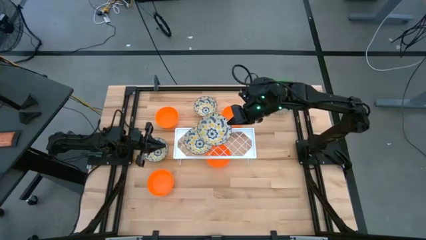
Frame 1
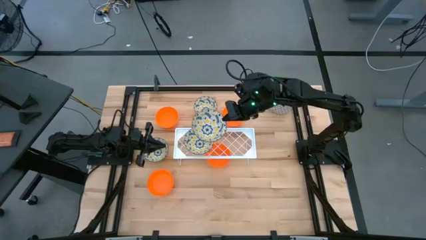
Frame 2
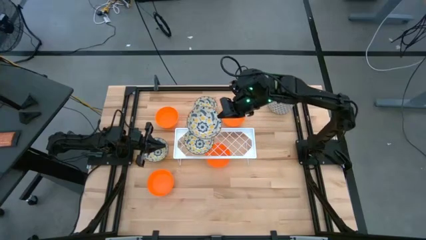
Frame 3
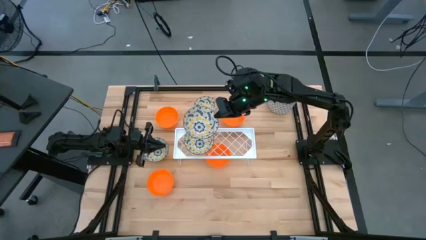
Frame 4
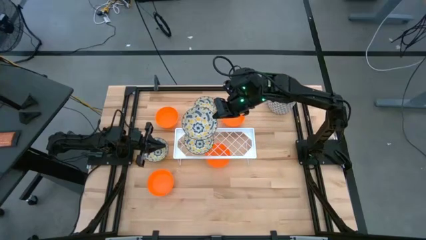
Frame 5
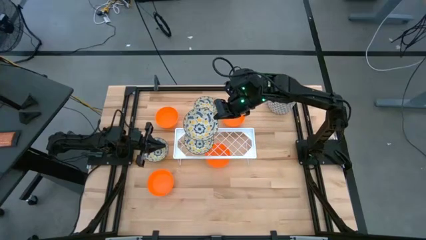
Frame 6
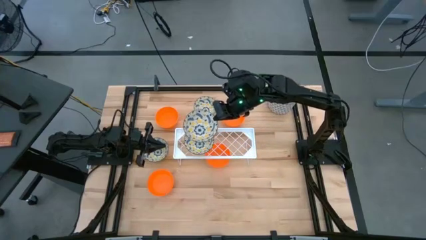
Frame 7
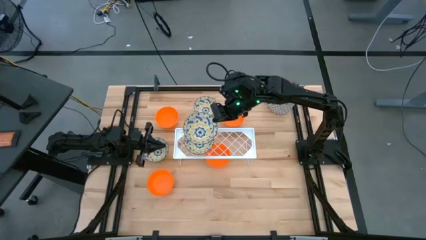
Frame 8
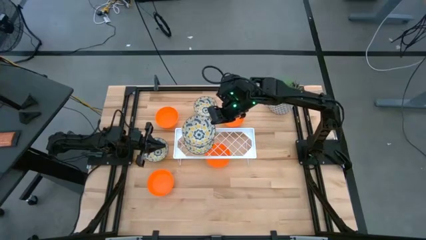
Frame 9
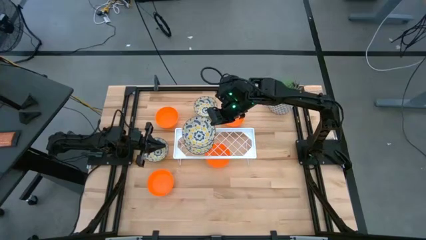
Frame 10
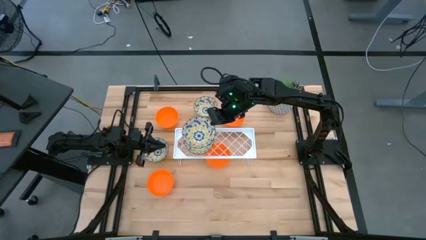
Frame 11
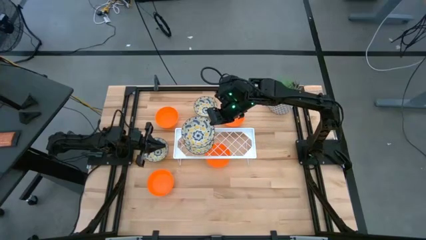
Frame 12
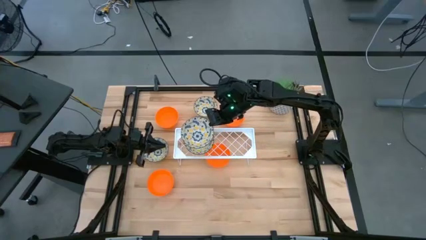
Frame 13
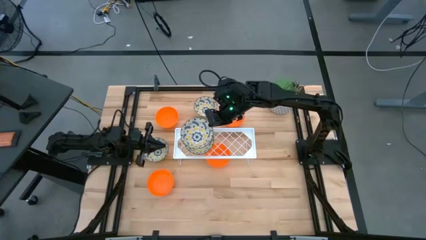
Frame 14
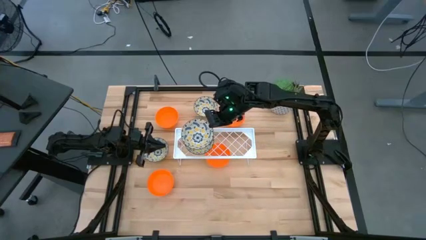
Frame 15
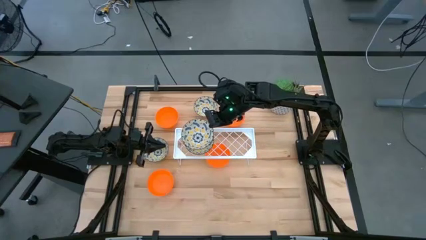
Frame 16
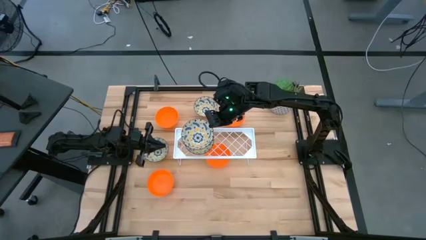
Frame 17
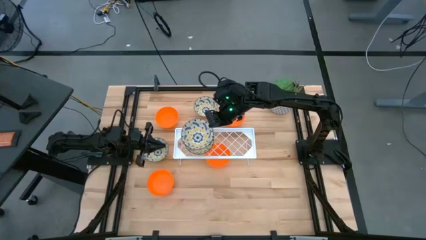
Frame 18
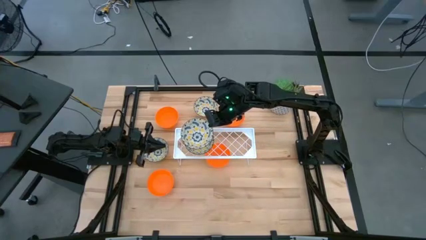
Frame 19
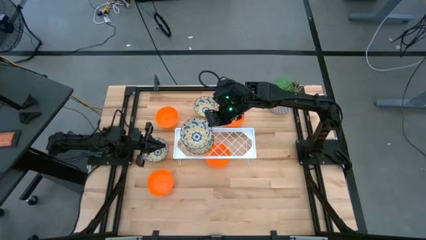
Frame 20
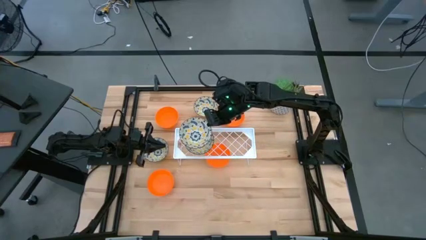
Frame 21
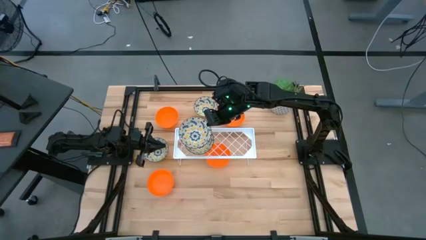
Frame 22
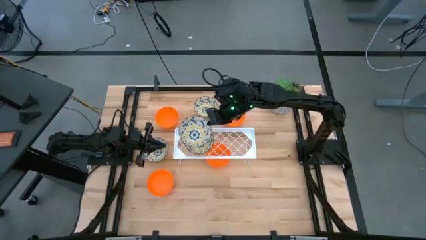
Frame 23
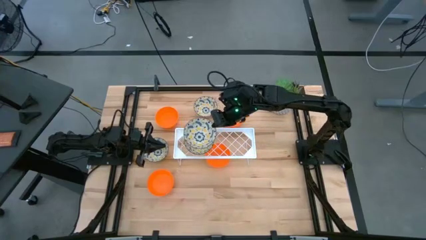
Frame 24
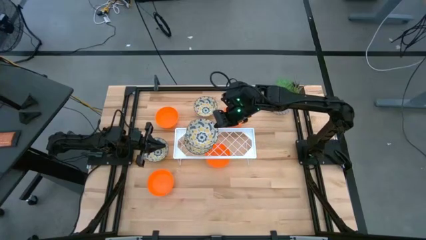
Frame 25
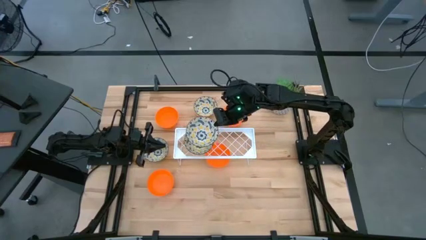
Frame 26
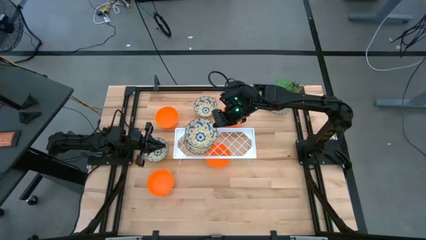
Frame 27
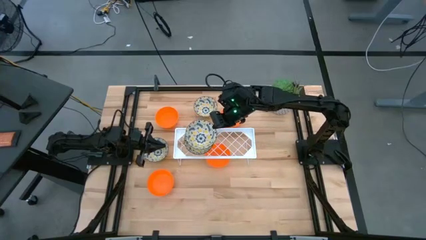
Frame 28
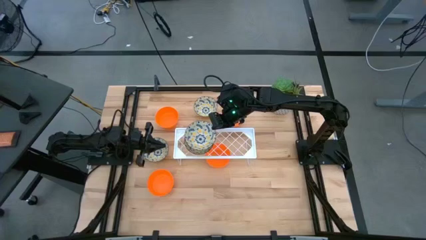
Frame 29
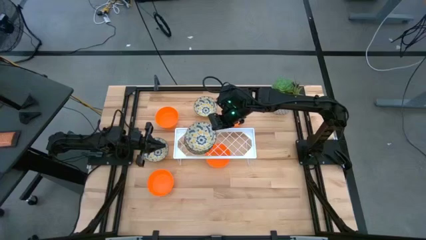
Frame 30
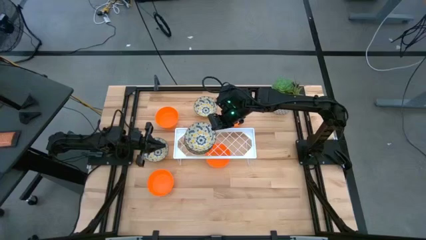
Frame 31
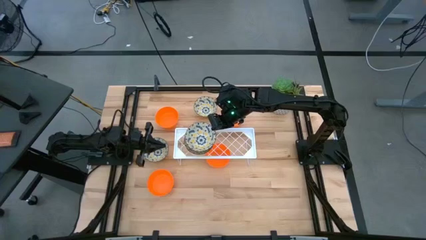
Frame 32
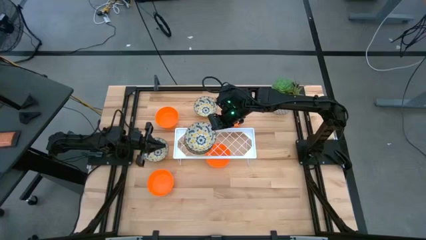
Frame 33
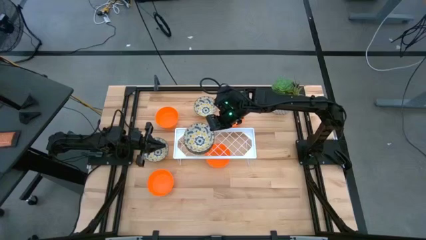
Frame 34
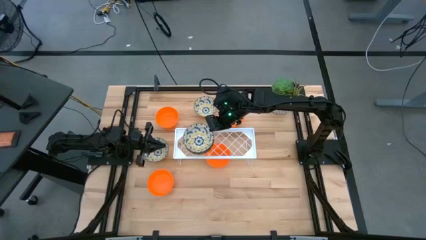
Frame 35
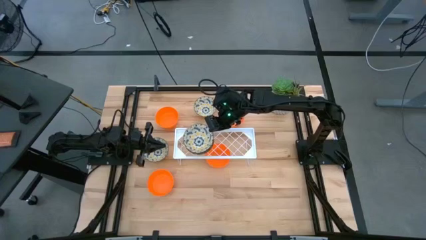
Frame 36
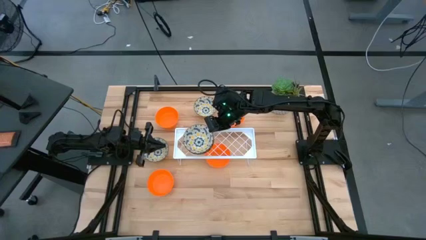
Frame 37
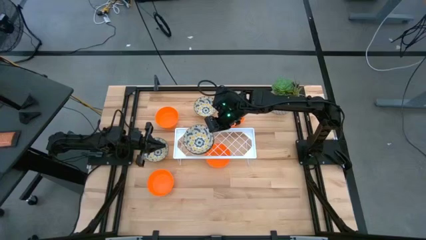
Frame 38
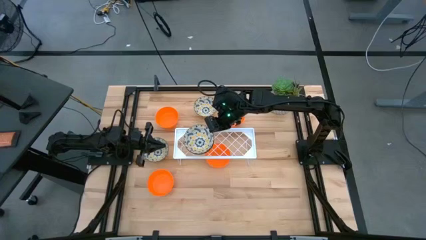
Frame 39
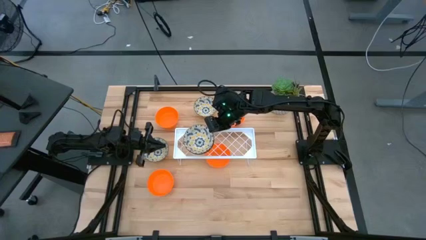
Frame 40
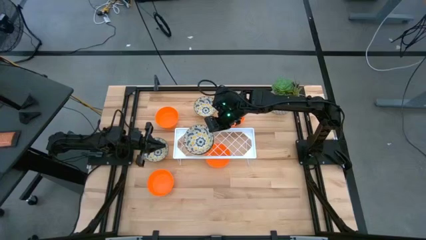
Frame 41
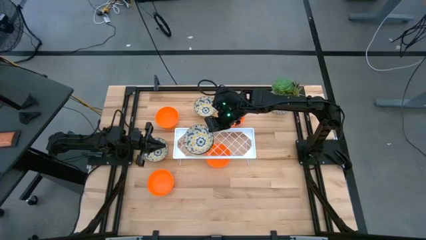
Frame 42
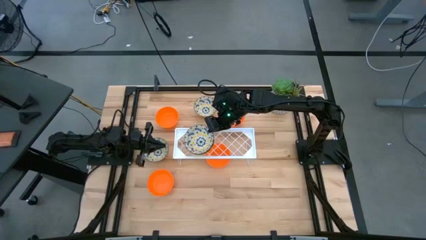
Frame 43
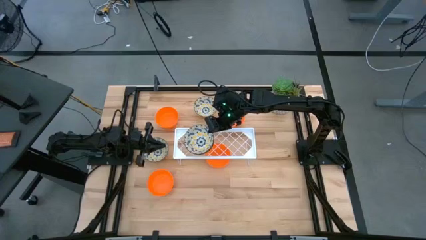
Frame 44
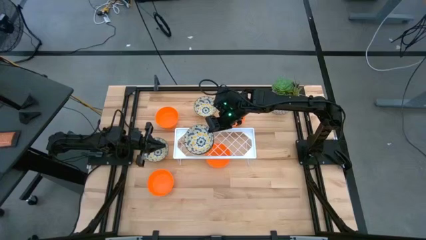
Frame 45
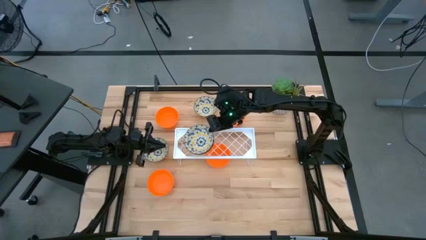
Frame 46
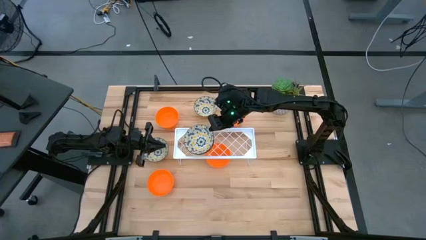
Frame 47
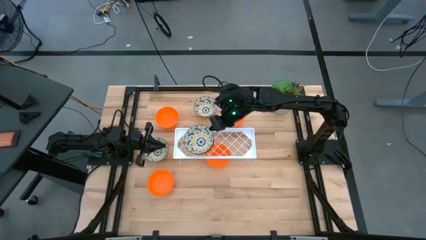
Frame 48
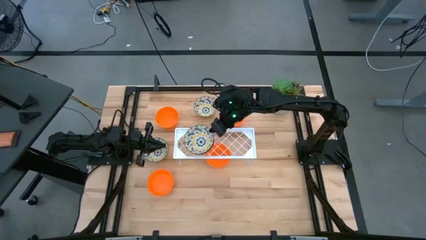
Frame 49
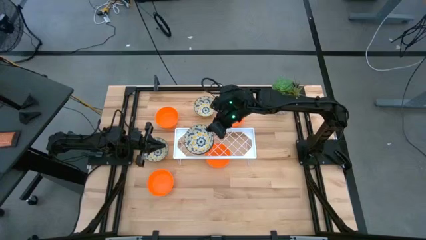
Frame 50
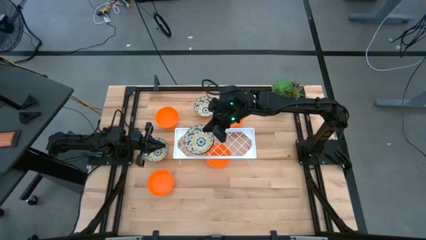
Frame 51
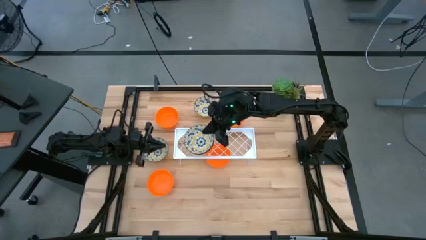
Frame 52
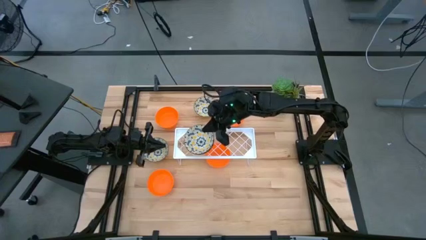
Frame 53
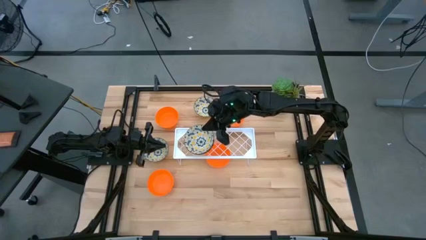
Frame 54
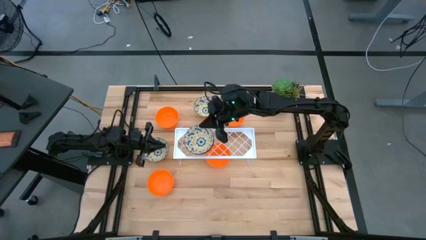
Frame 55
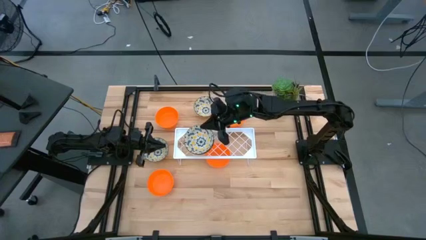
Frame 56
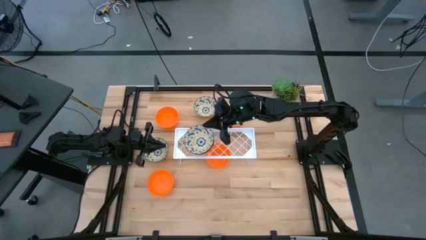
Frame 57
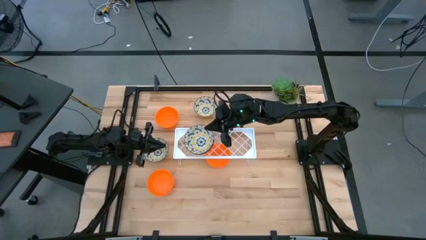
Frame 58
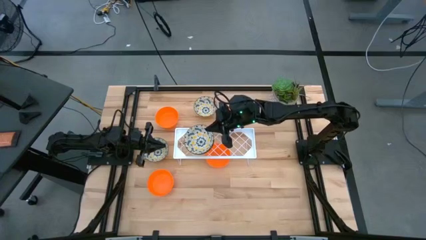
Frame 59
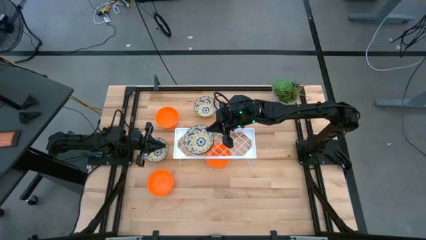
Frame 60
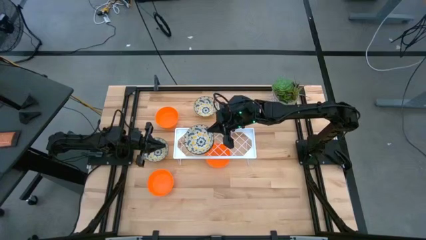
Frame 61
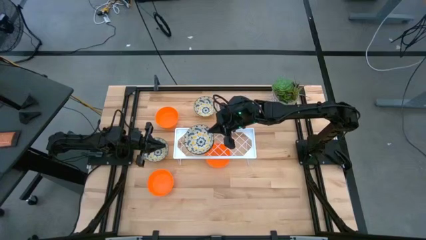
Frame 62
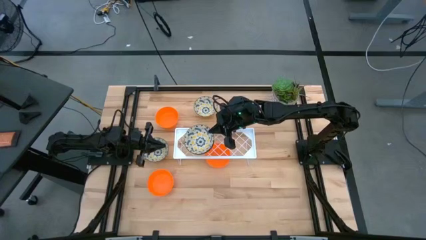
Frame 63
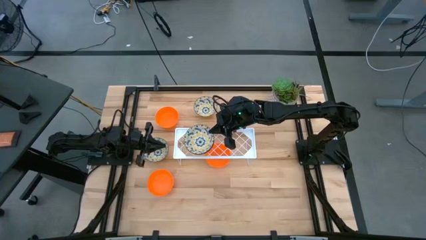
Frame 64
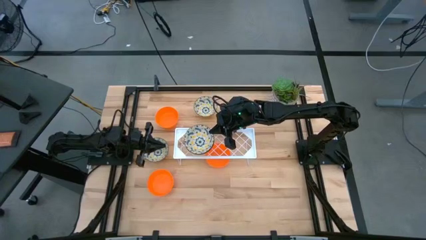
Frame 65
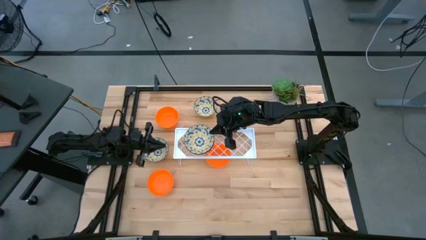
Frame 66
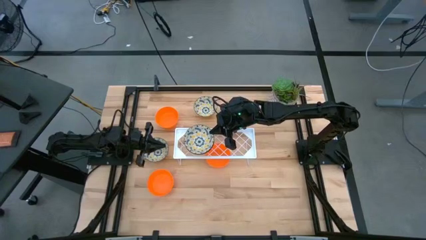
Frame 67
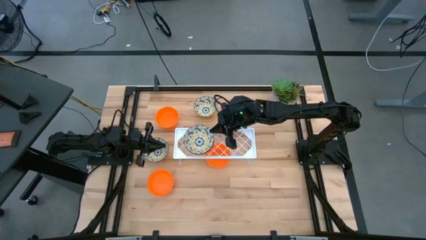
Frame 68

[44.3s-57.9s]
Task: Pick & Place Mini bowls
Stack the white patterned bowl on the white patterned bowl on the shelf
